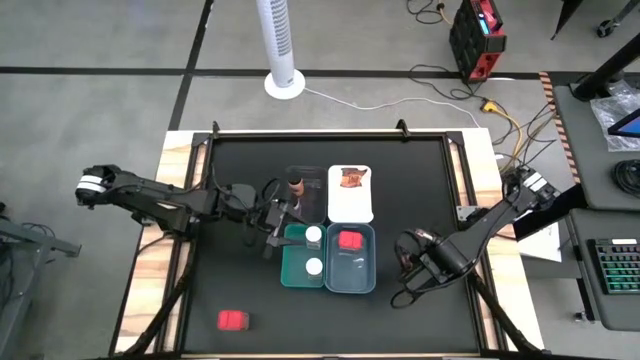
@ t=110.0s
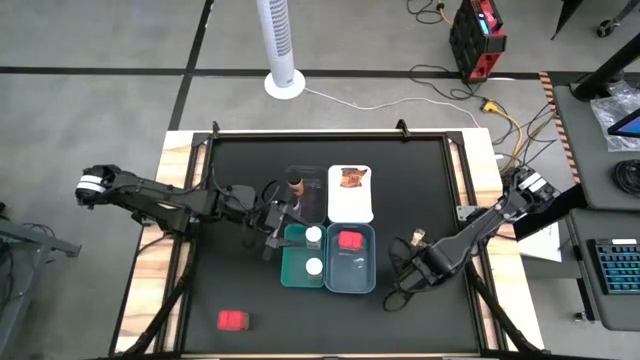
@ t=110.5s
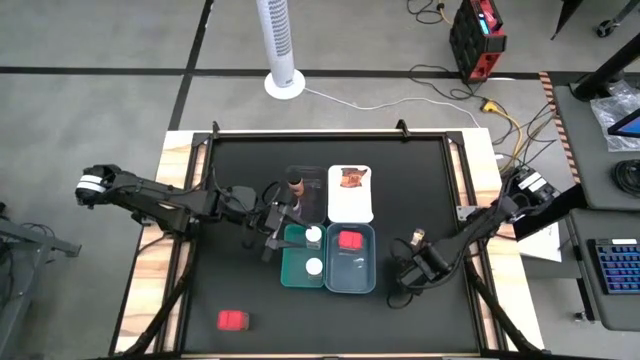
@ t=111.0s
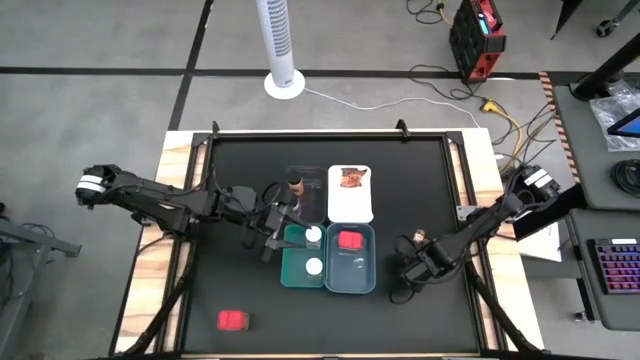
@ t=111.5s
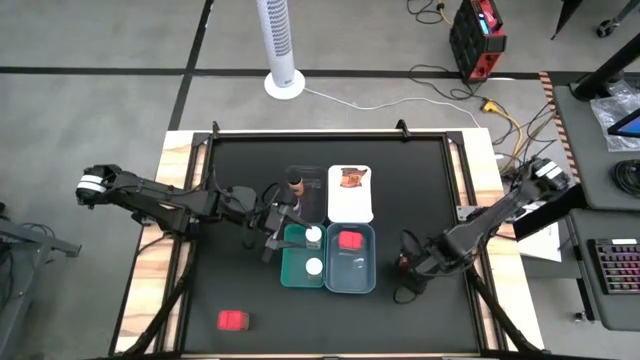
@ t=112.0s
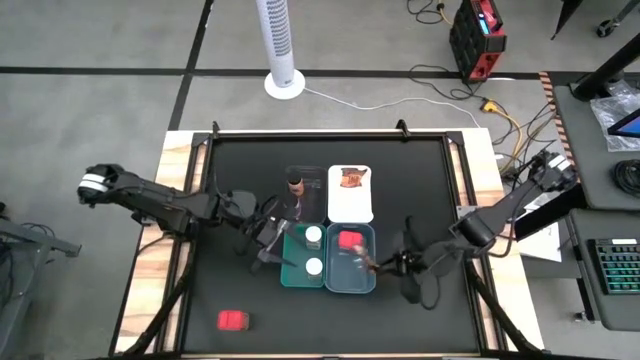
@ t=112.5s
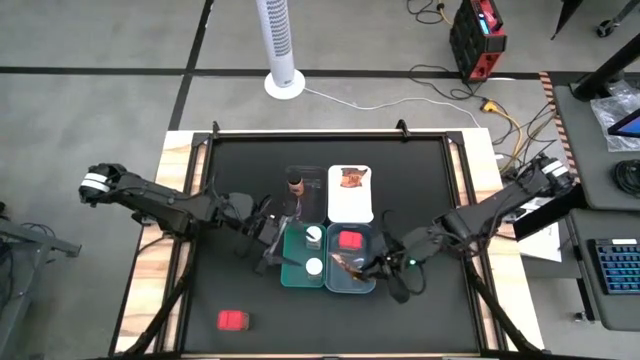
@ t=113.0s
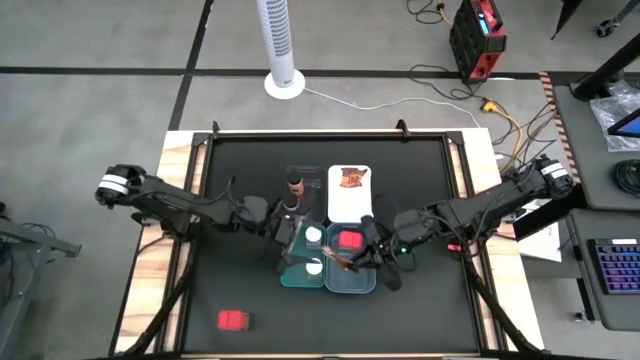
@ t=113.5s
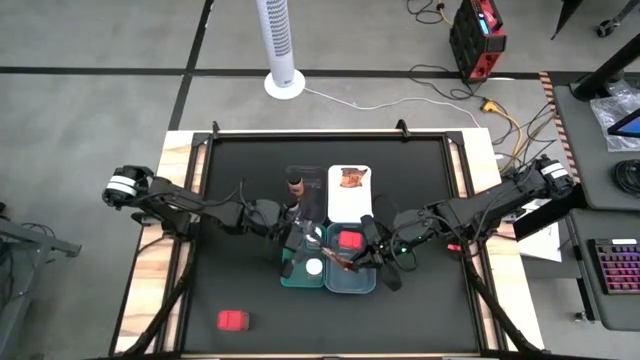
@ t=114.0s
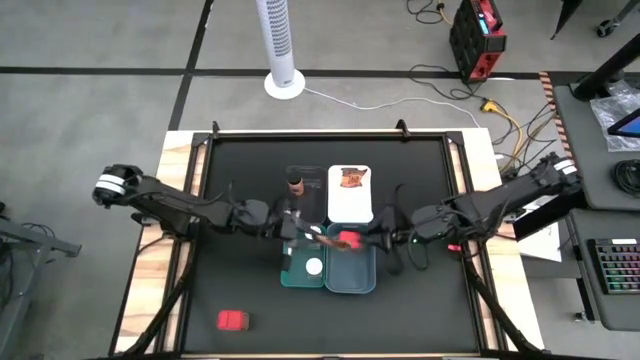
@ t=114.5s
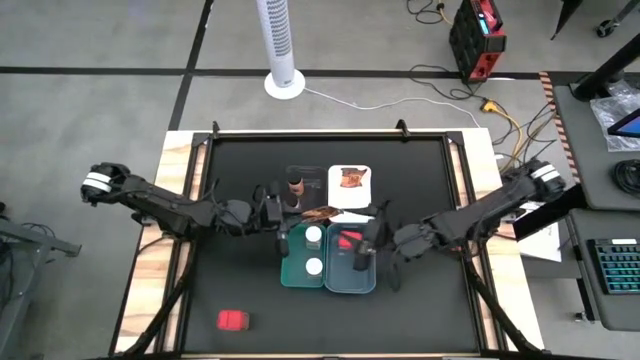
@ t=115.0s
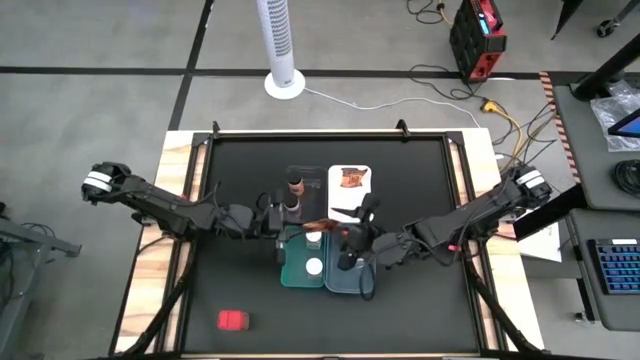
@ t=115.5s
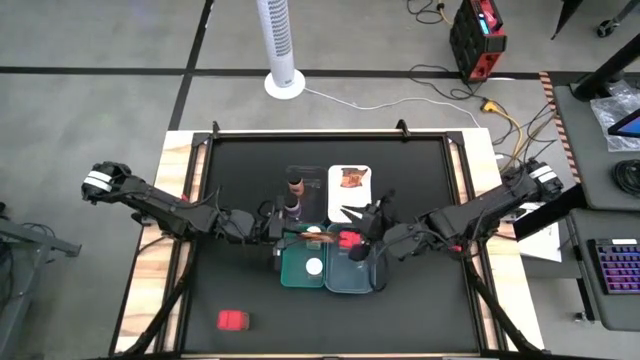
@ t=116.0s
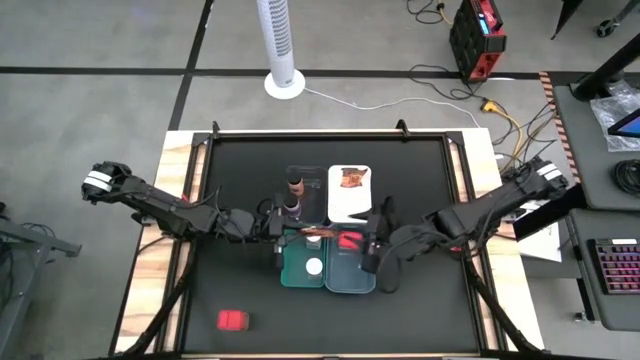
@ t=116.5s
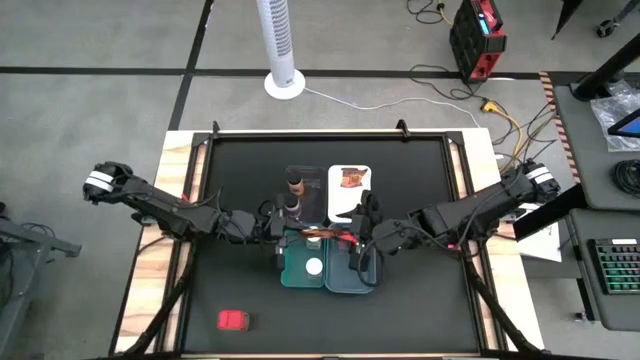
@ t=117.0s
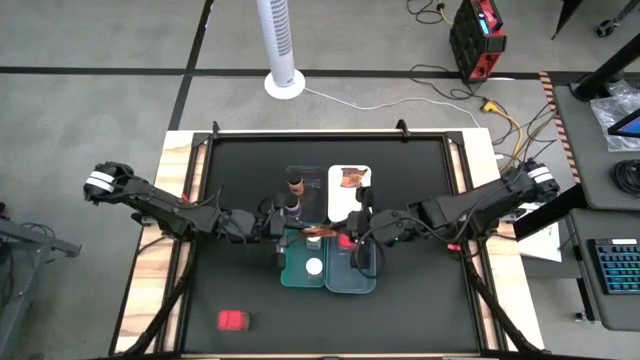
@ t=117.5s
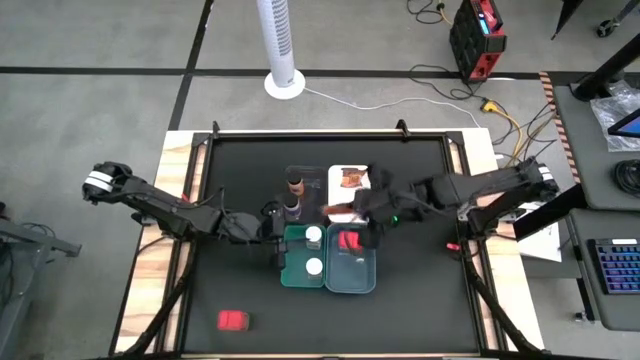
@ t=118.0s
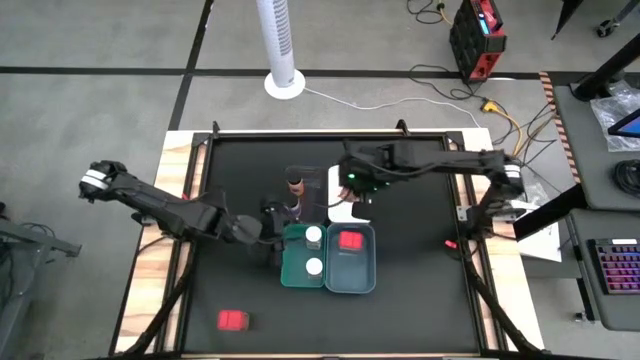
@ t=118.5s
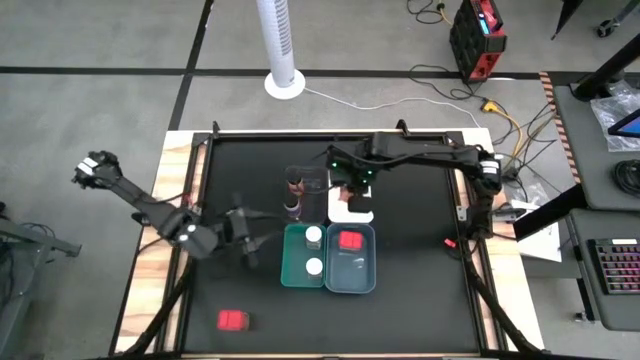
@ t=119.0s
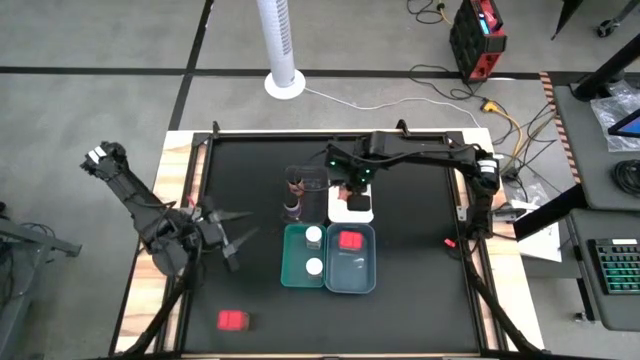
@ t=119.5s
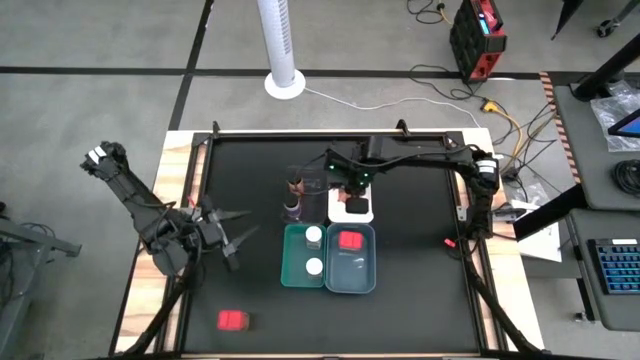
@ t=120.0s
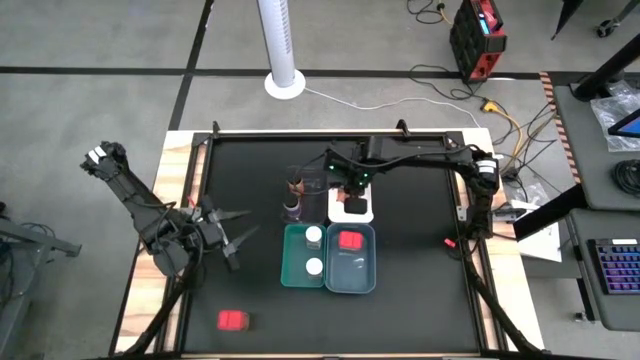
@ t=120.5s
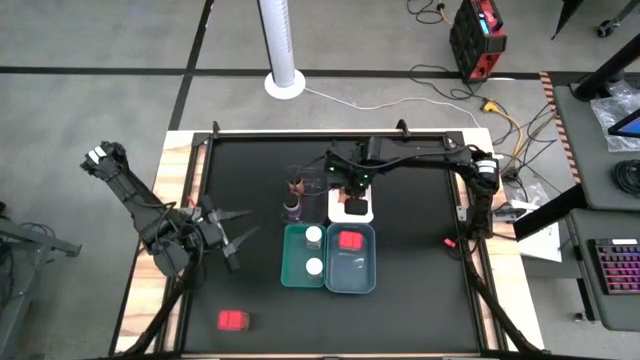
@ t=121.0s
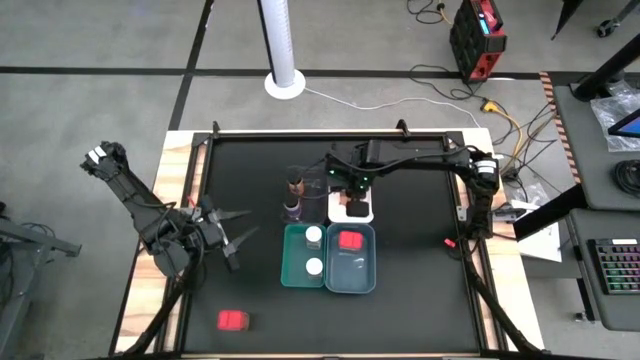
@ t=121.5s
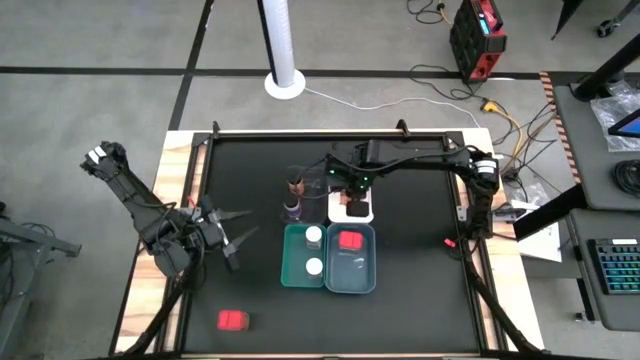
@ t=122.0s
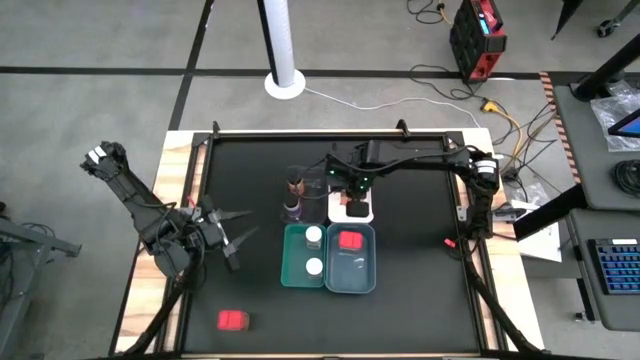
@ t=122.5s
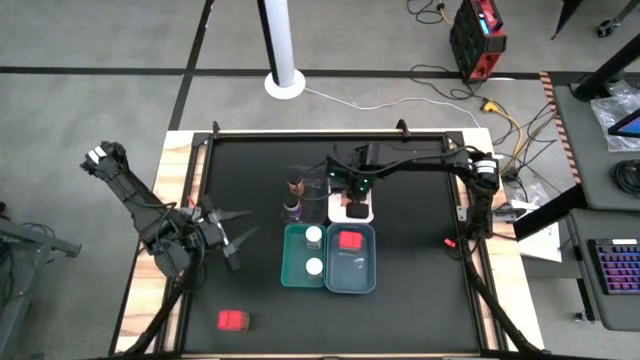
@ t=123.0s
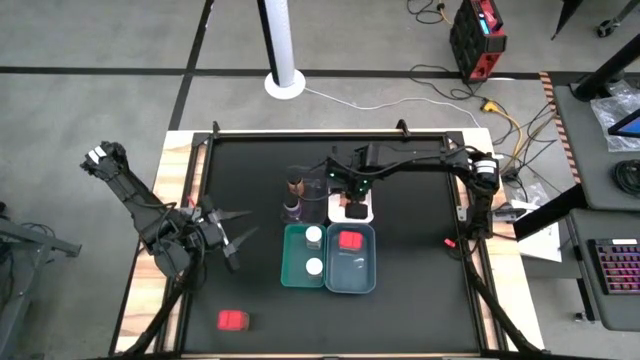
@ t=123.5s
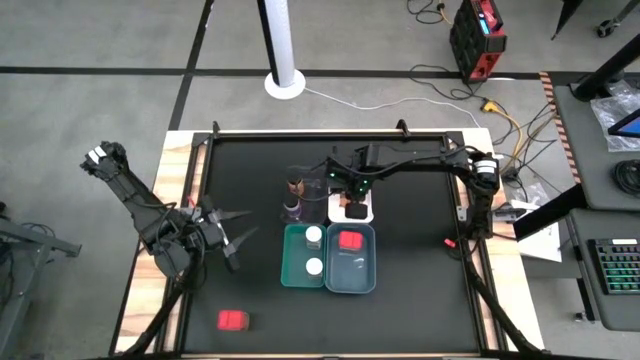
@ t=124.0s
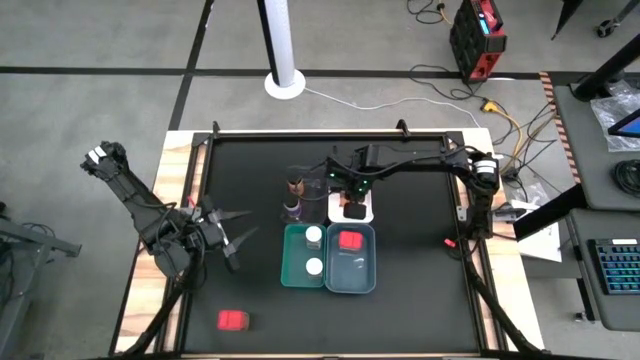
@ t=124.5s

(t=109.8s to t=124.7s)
Task: Sort spices by type
Put the orange seasoning pack into the white bin

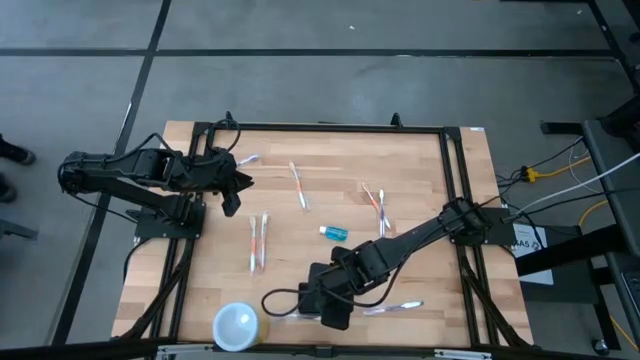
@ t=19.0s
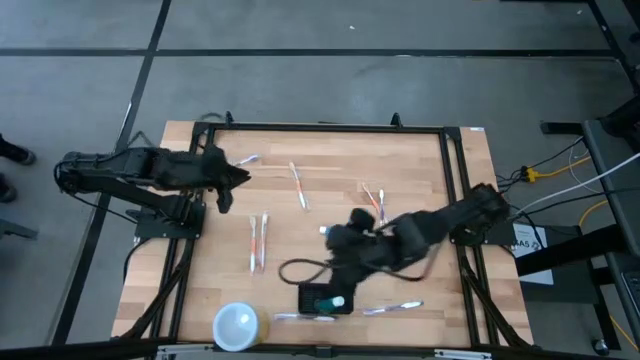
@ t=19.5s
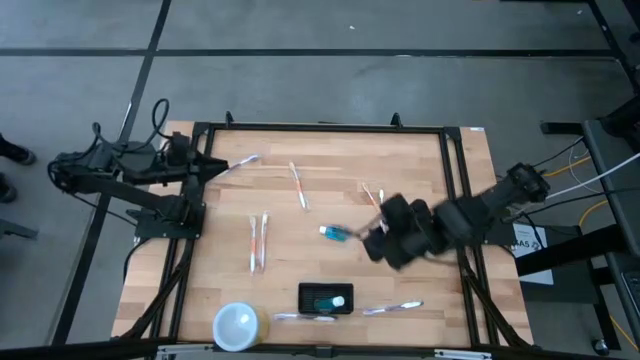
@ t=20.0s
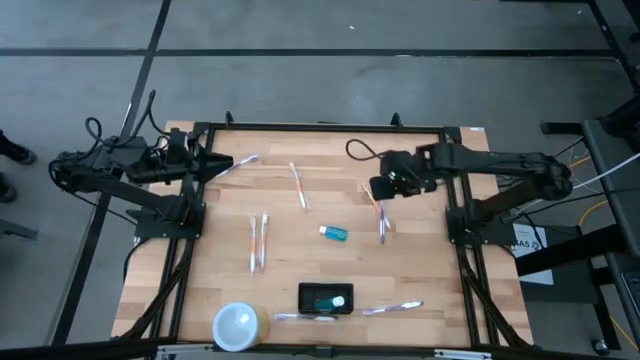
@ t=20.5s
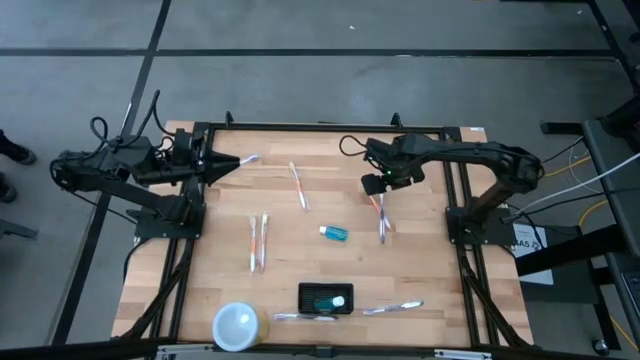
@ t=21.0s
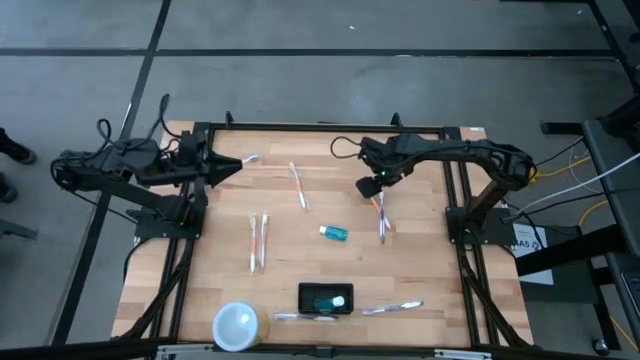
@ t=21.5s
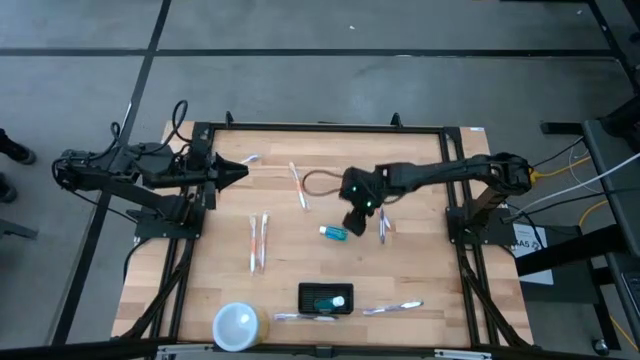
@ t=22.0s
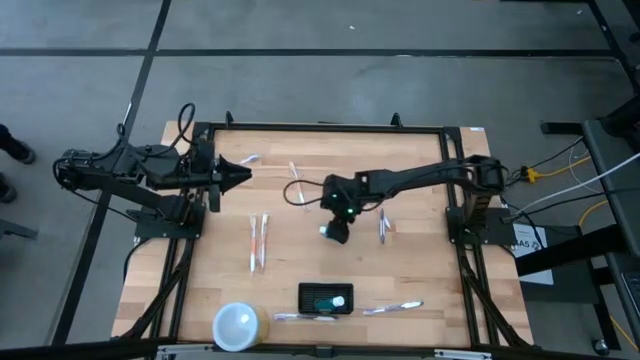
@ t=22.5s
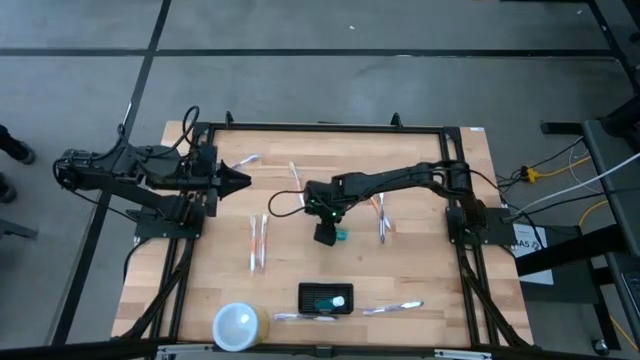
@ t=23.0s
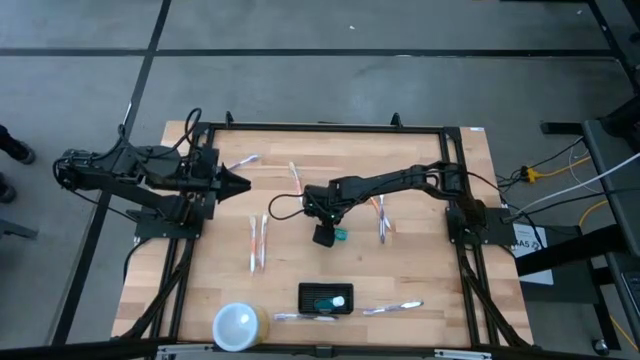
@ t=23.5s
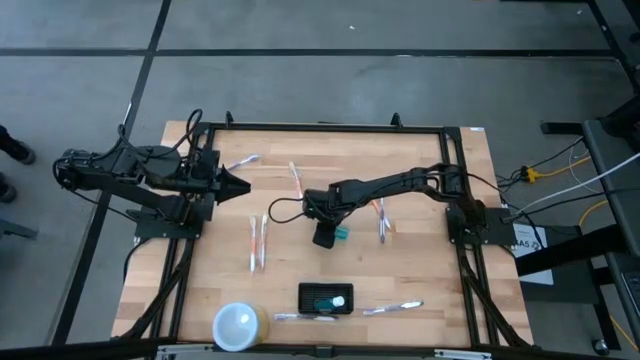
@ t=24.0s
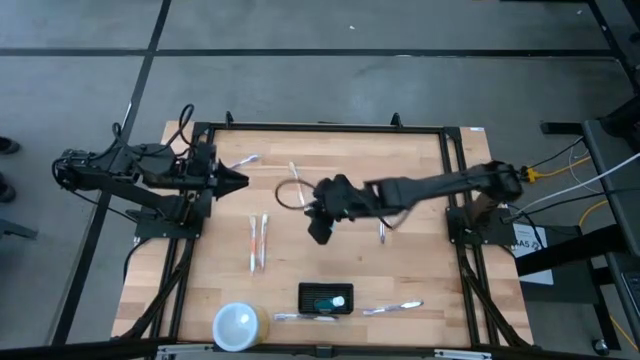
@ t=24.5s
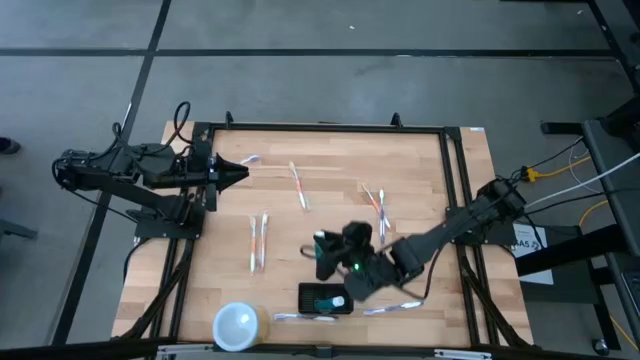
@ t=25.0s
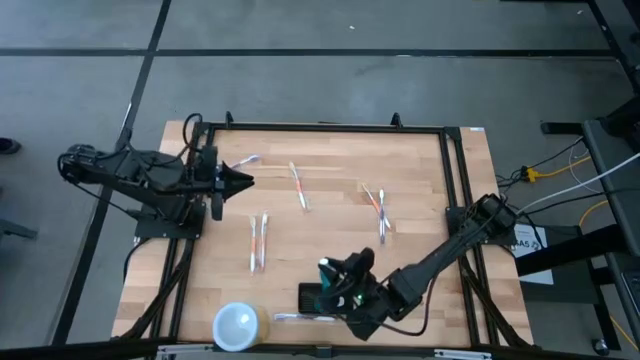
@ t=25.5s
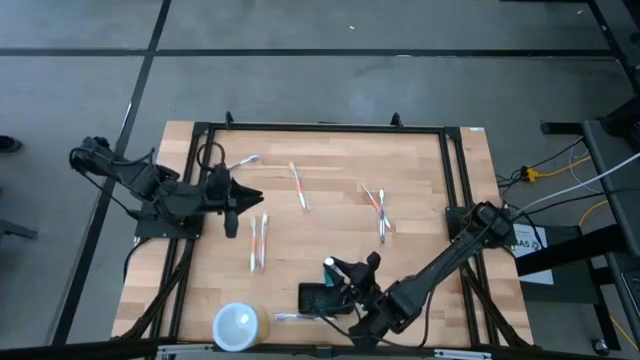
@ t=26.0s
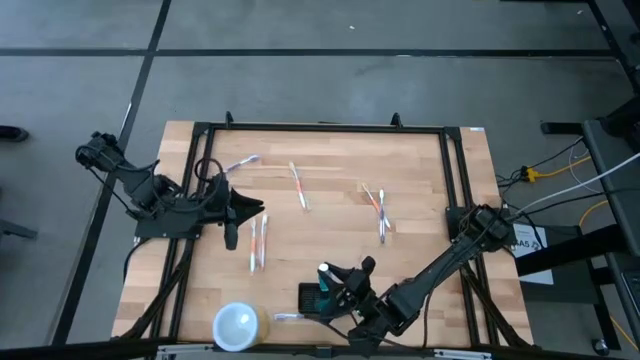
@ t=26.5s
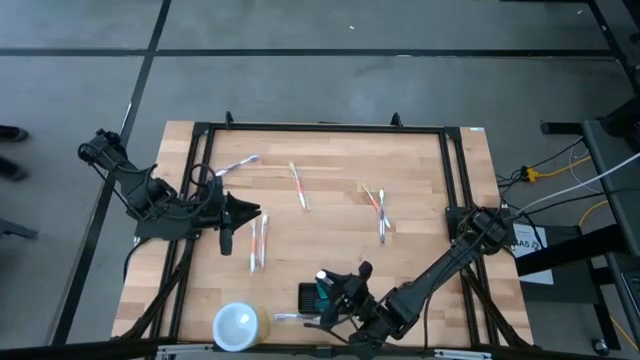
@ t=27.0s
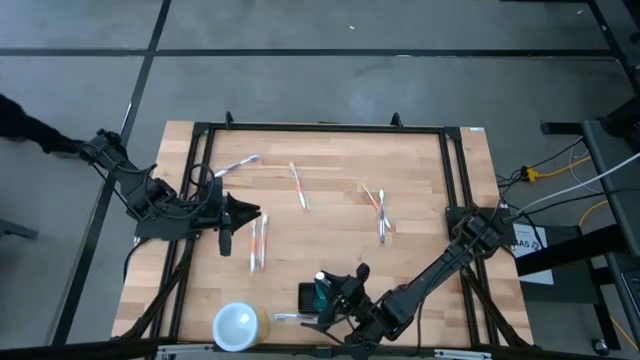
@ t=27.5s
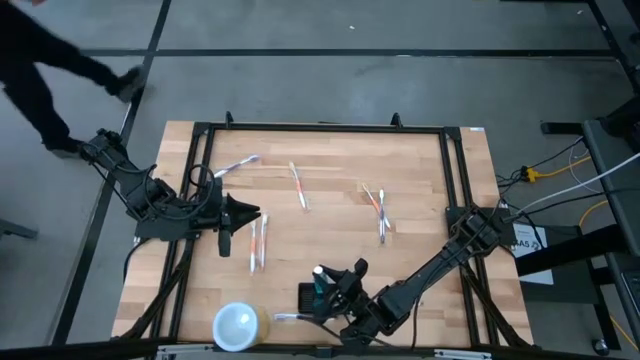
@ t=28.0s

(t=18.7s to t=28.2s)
Task: Pick & Place toothbrushing station
Put the mouthwash into the mesh organizer
